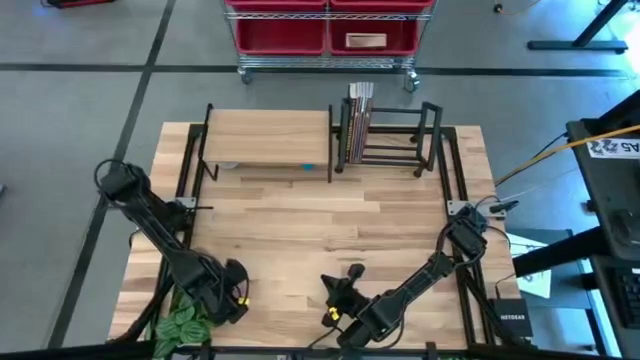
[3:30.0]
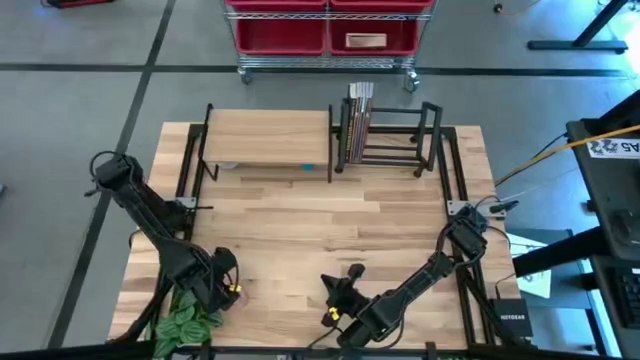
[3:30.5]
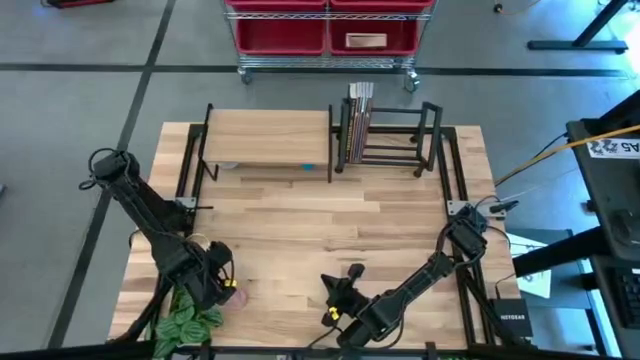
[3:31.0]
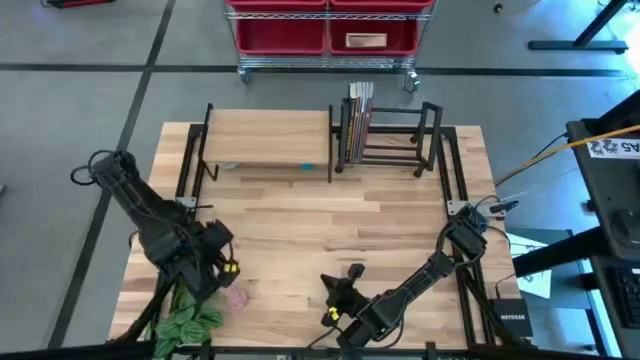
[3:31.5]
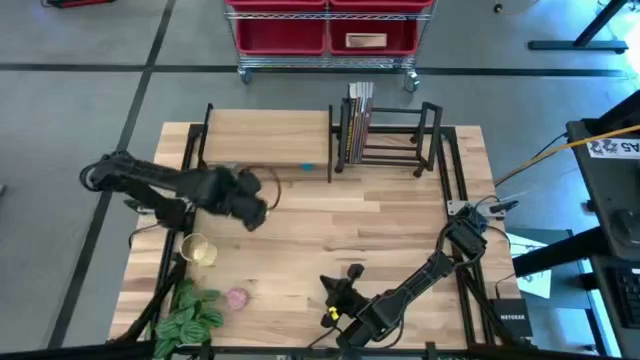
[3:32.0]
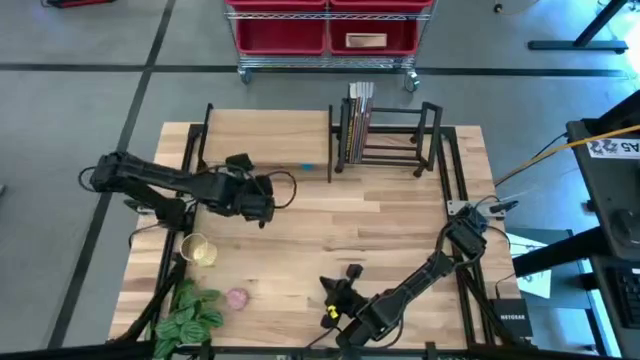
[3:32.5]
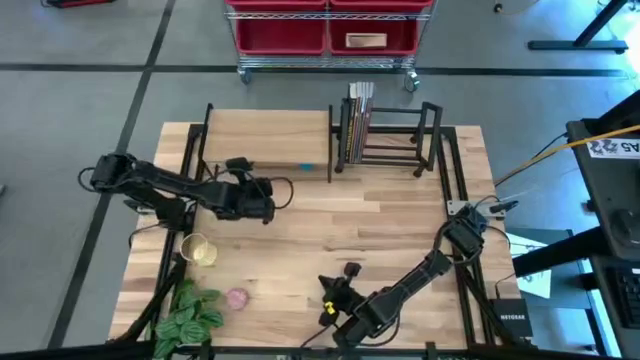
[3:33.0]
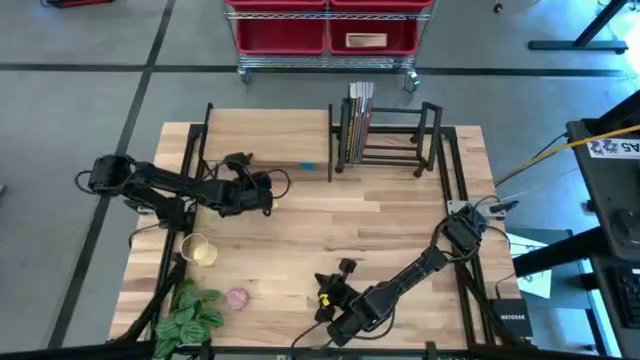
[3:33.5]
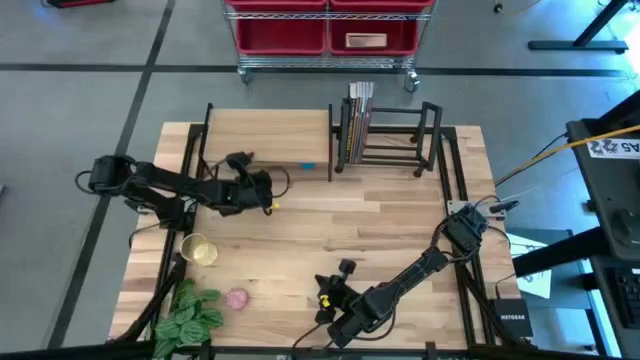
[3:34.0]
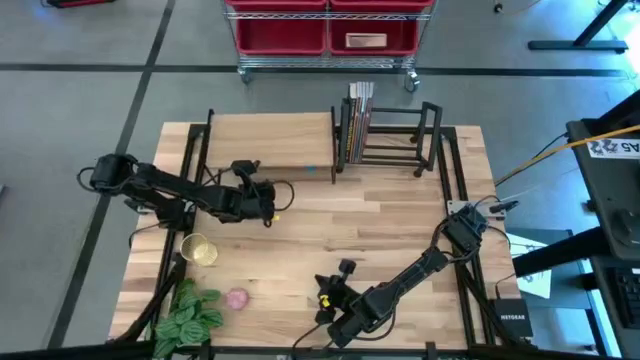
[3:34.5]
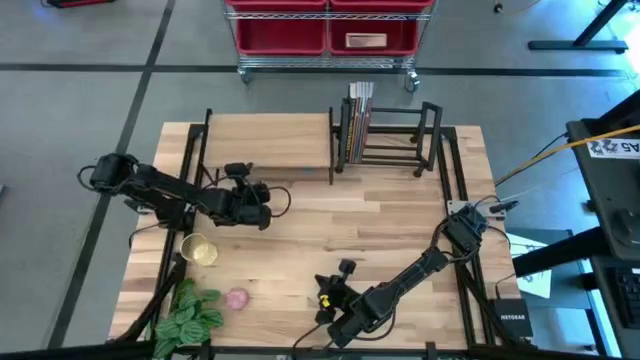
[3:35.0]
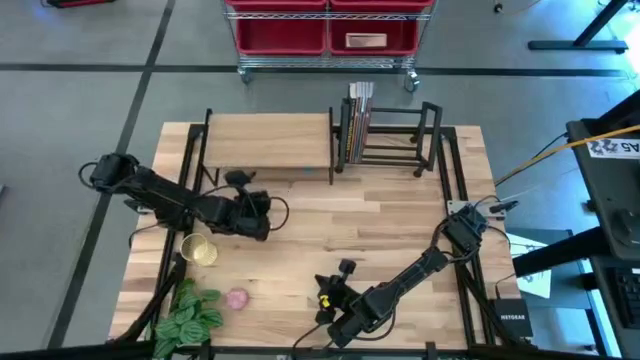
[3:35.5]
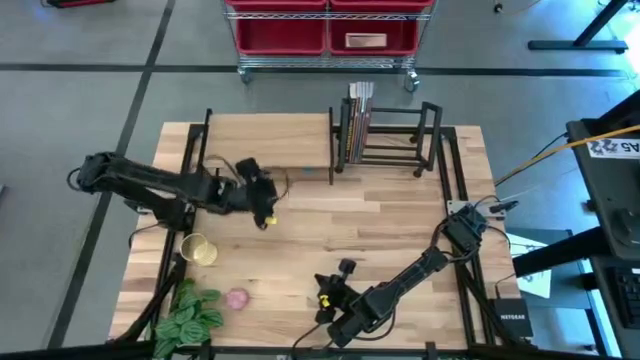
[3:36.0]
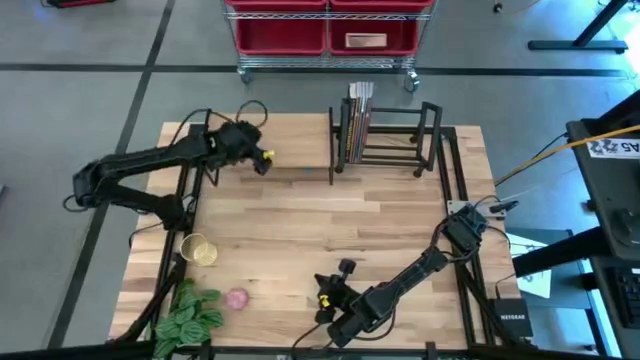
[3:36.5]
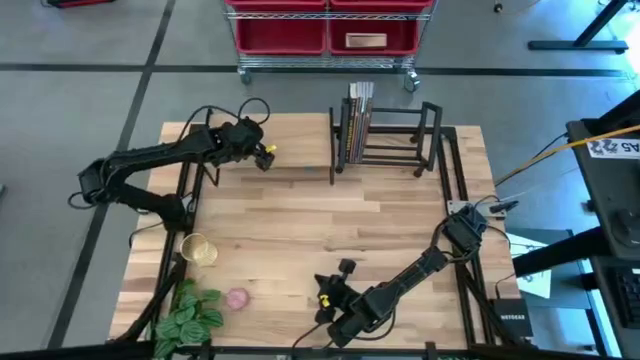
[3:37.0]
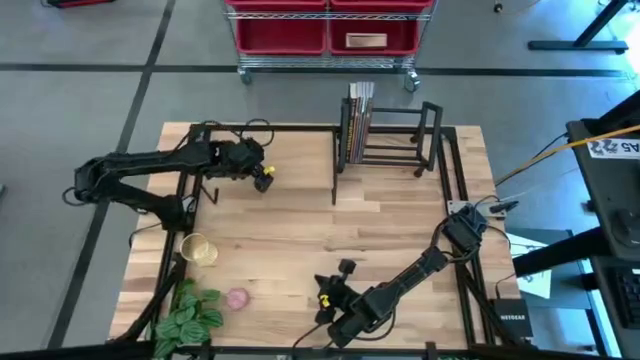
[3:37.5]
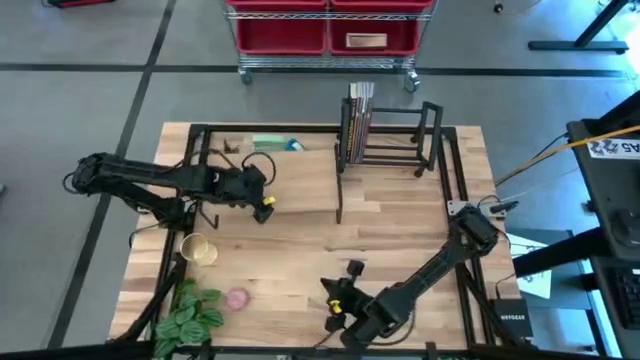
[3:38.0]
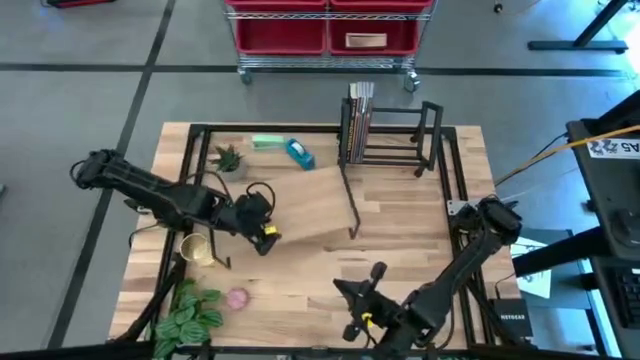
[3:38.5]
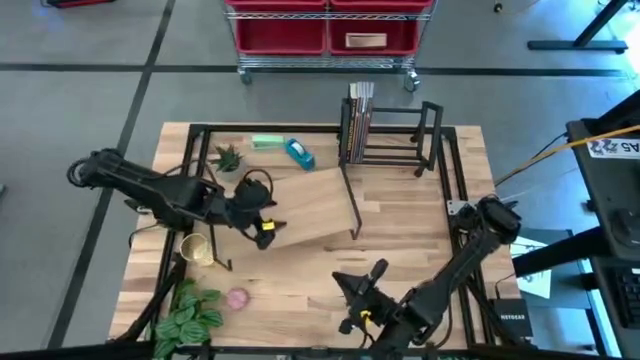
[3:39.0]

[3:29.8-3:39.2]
Task: Stock shelves
Move the shelf to the center

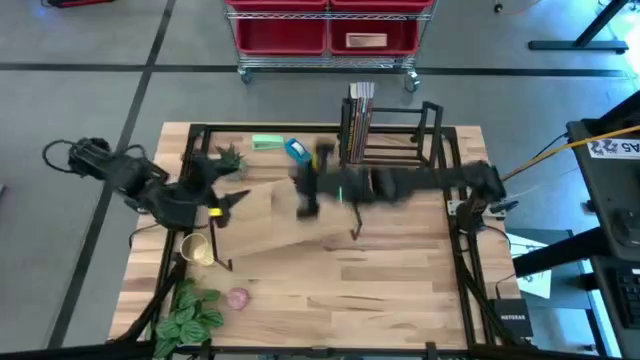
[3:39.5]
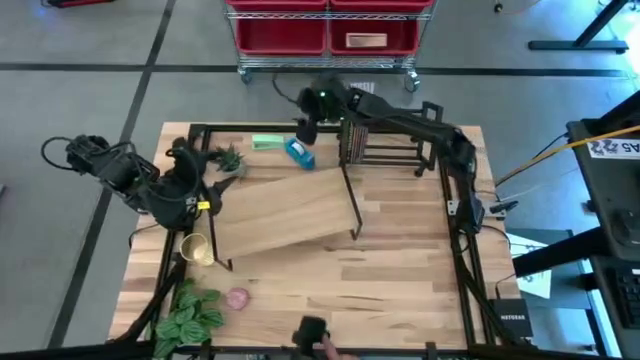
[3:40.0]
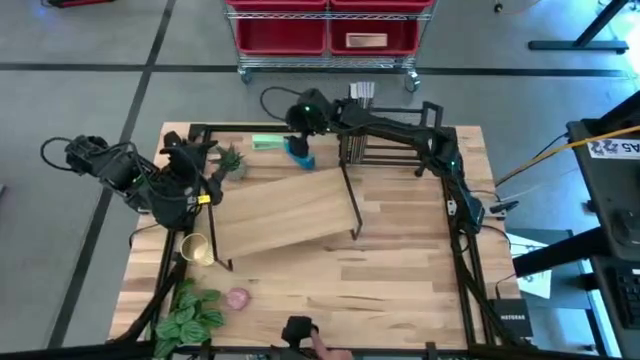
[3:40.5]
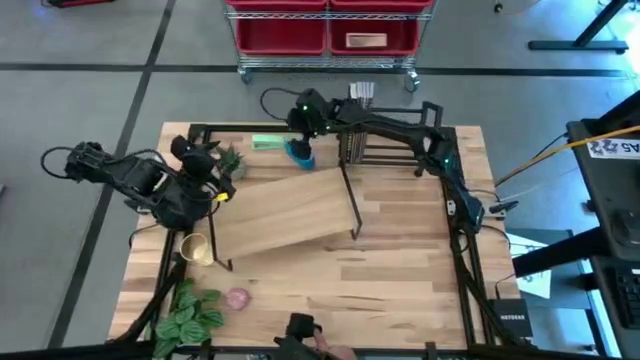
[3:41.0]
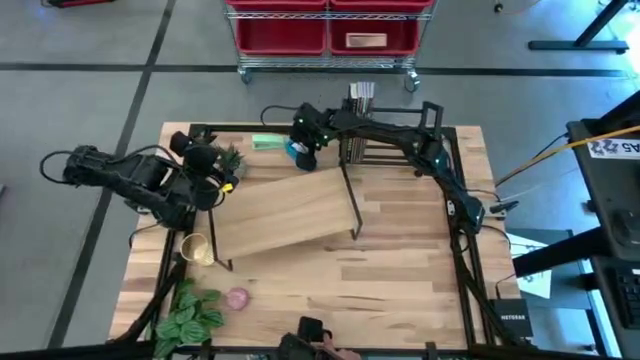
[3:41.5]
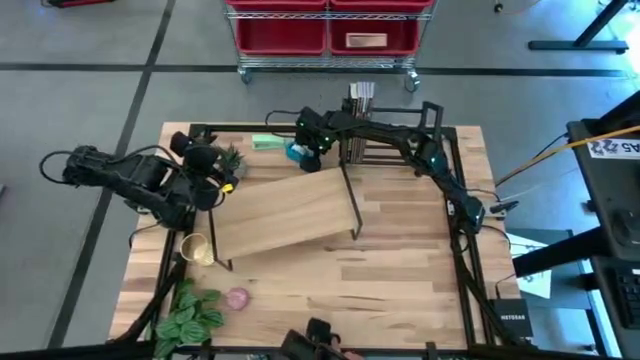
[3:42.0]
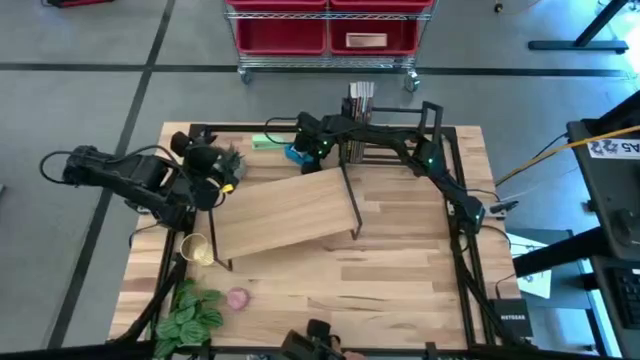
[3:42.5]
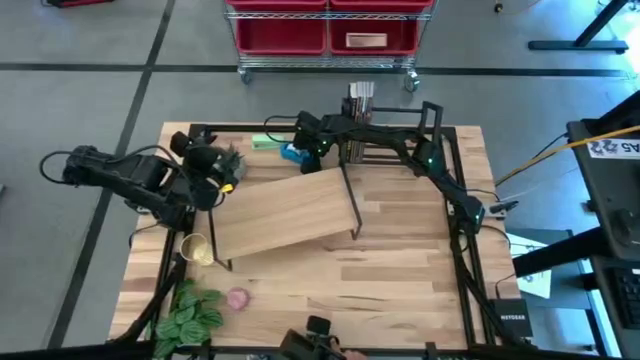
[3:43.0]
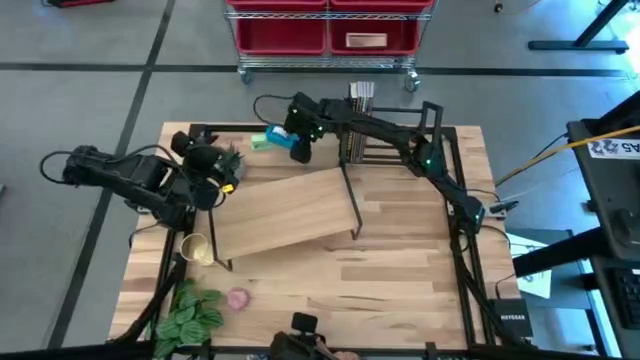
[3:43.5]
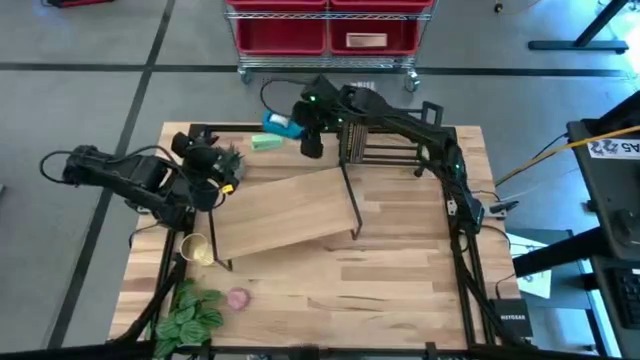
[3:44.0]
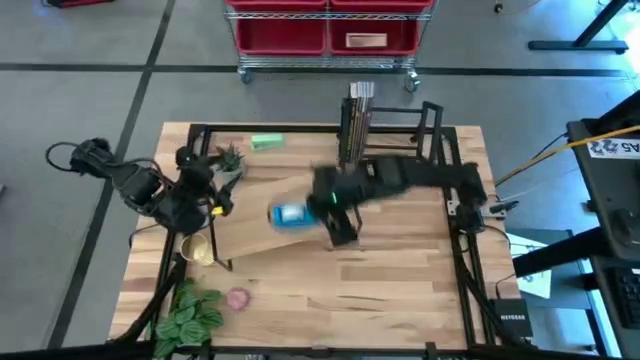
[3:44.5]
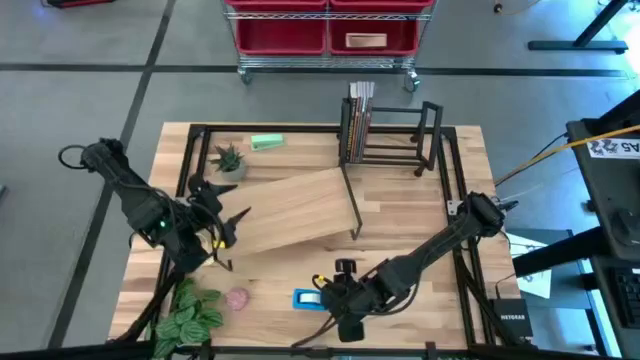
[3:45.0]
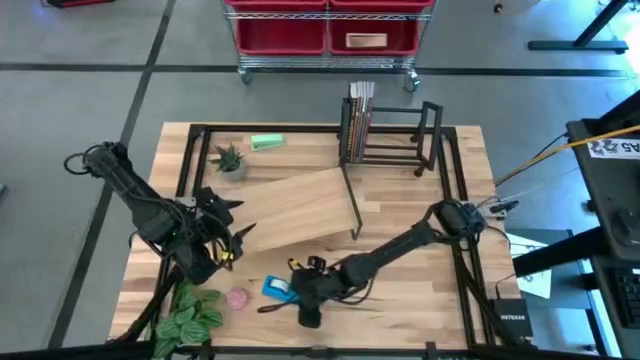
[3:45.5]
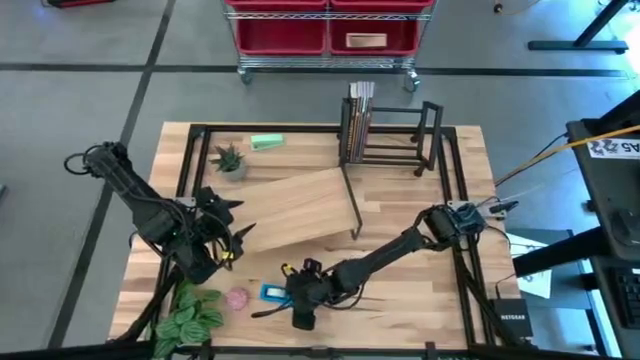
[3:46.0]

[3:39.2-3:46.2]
Remove the blue tape dispenser from under the shelf

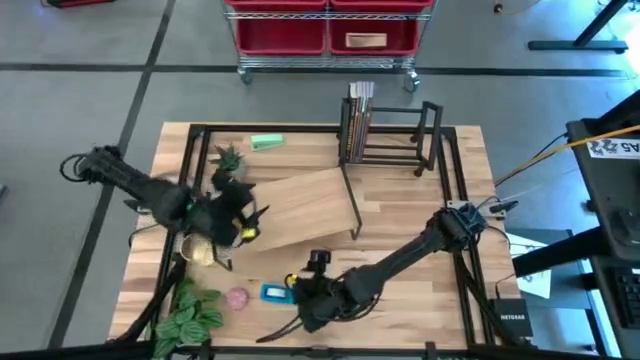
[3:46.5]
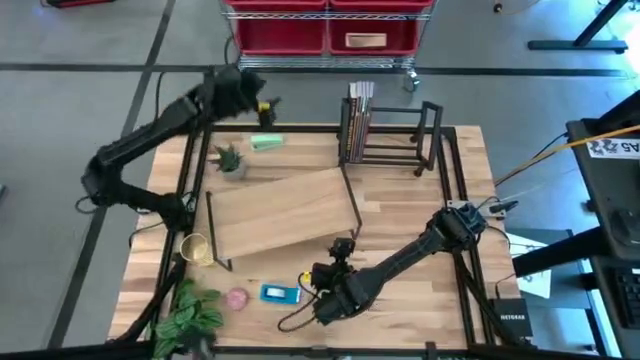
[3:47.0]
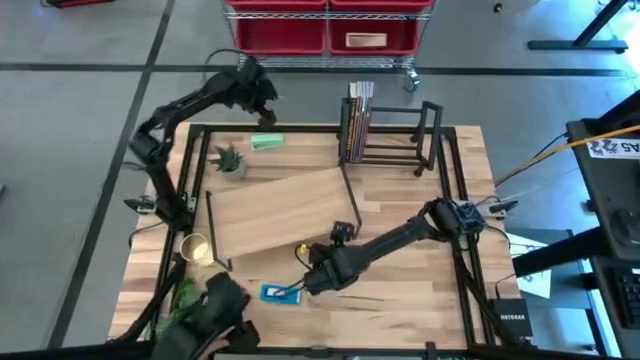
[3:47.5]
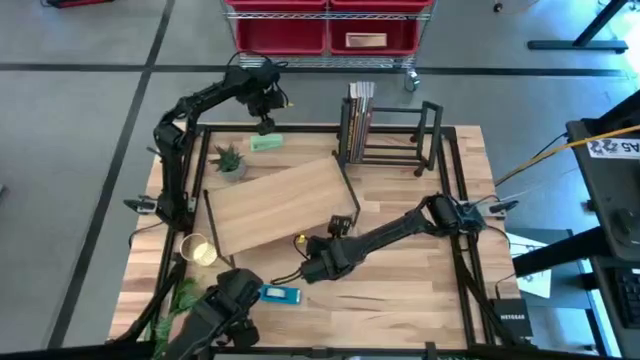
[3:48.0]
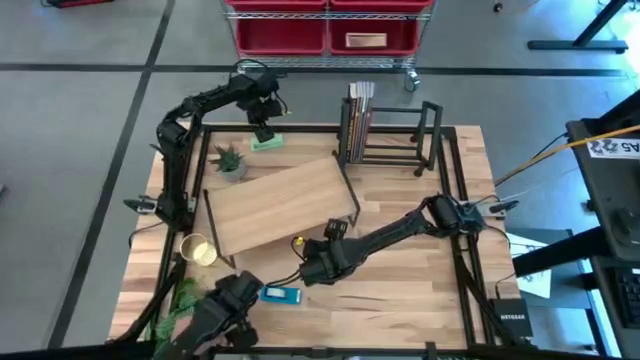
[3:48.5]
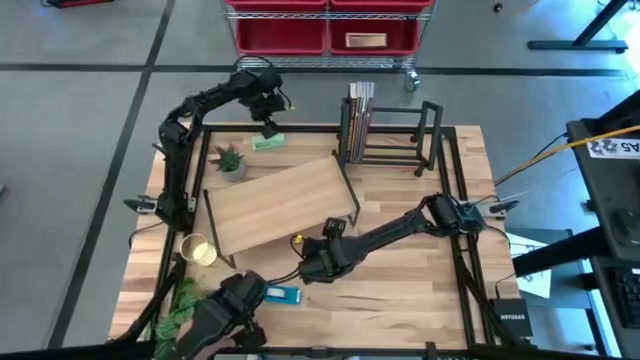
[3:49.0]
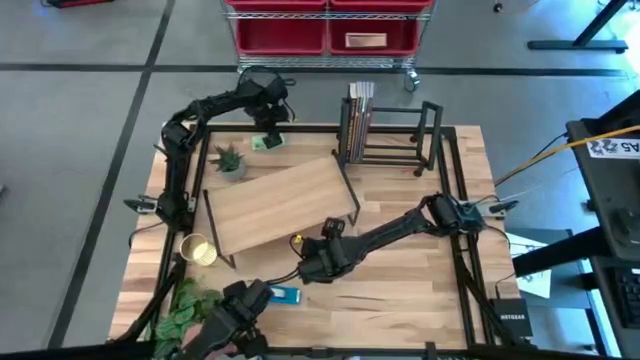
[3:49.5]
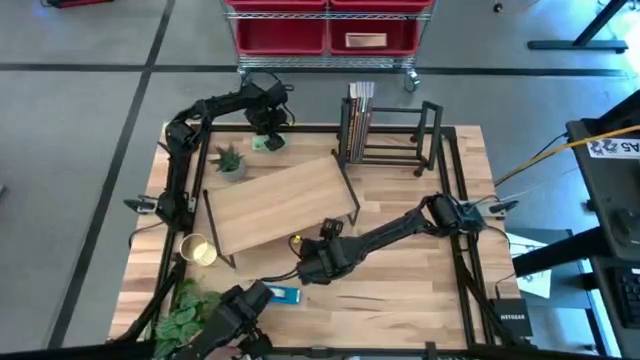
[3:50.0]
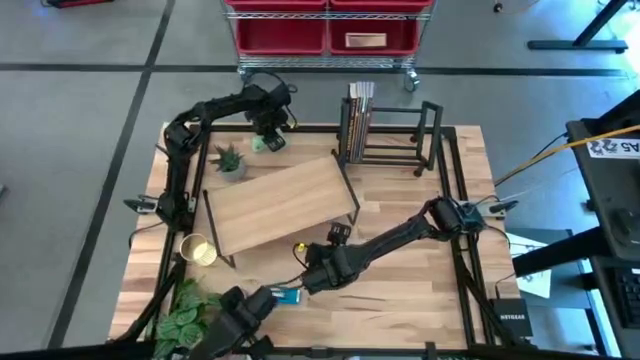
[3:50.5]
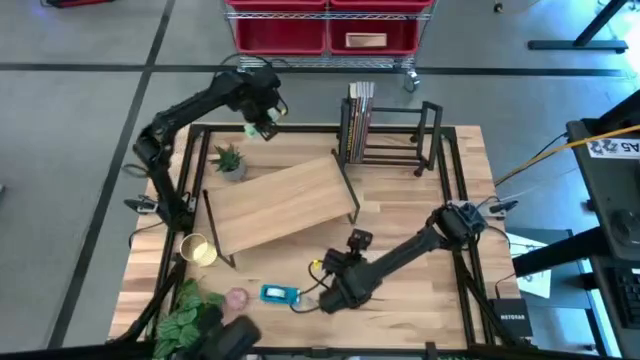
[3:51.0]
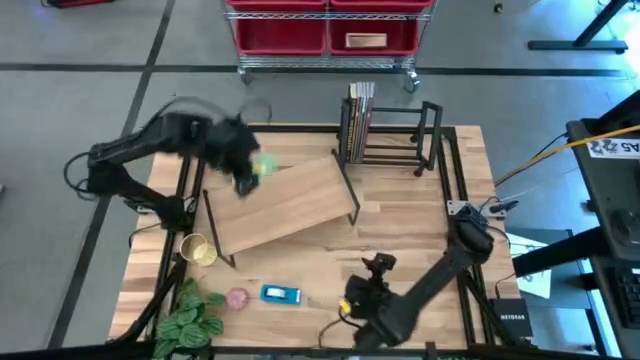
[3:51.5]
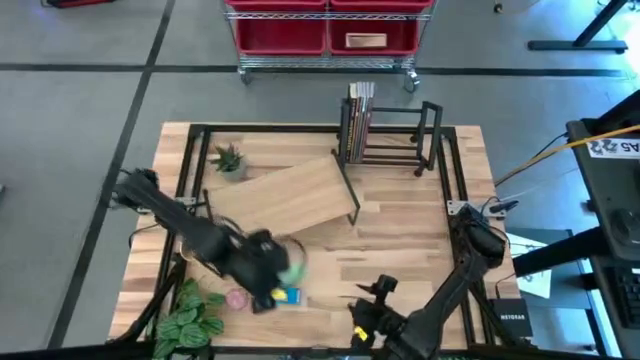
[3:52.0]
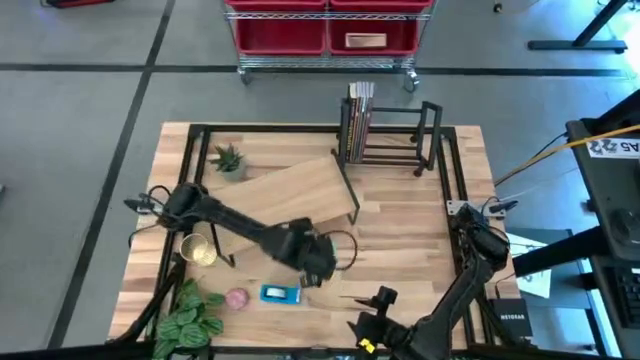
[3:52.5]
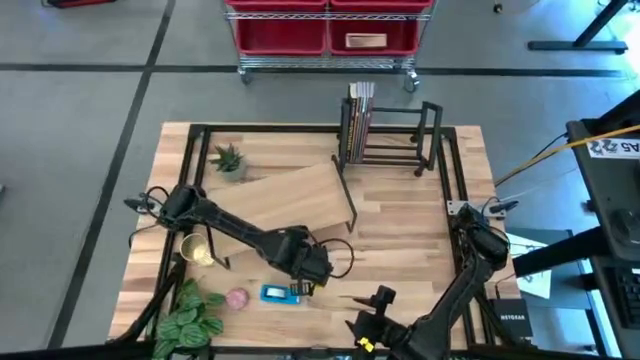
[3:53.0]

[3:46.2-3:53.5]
Remove the green stapler from under the shelf
